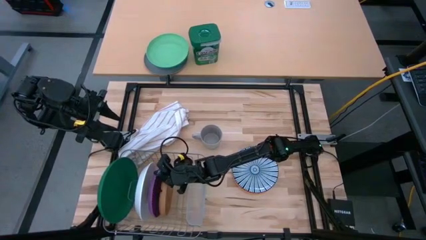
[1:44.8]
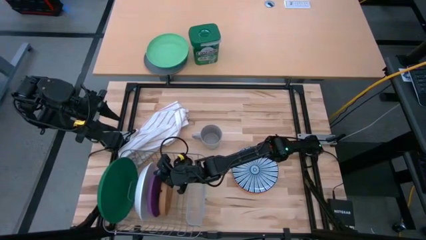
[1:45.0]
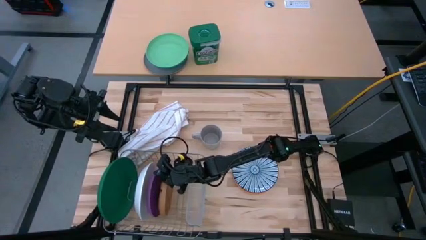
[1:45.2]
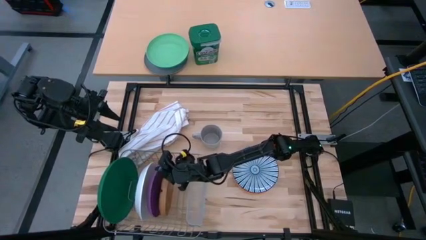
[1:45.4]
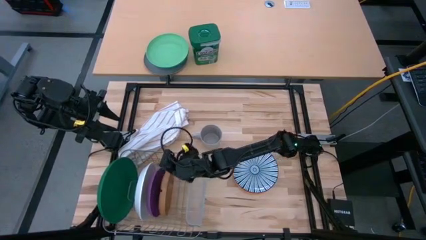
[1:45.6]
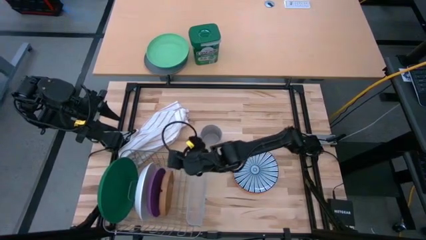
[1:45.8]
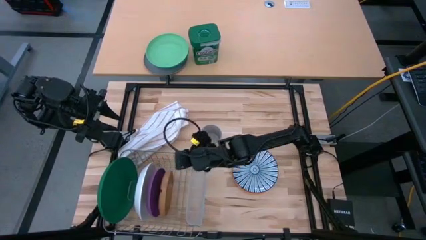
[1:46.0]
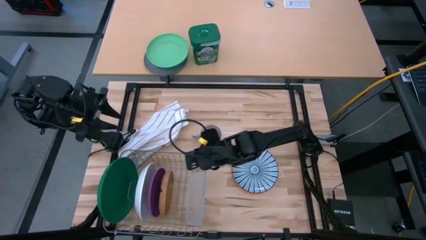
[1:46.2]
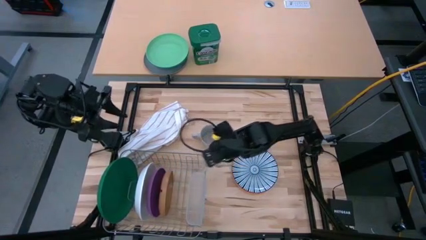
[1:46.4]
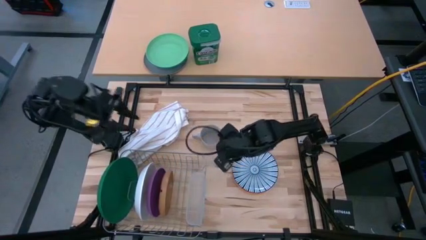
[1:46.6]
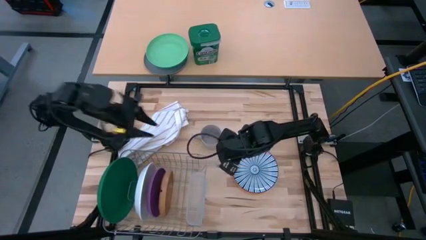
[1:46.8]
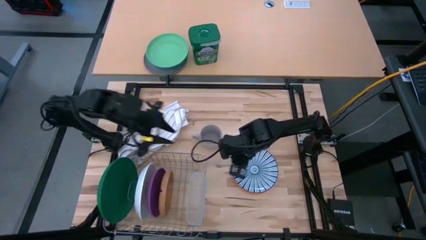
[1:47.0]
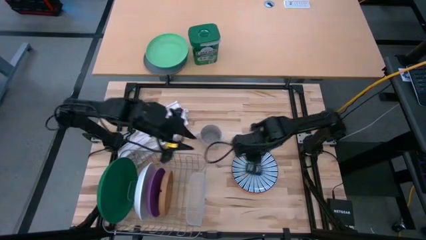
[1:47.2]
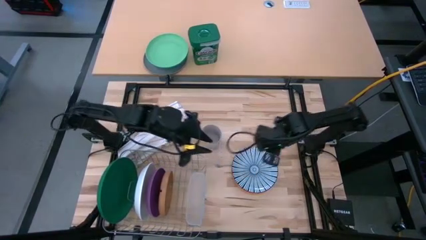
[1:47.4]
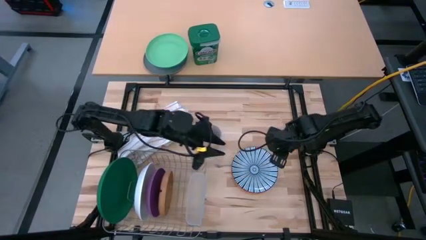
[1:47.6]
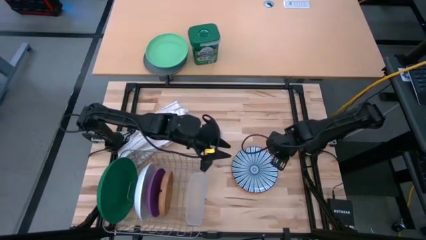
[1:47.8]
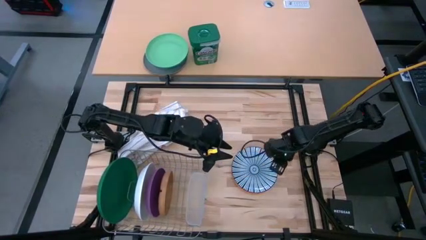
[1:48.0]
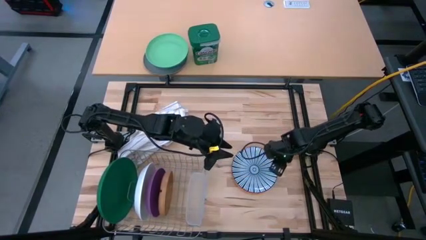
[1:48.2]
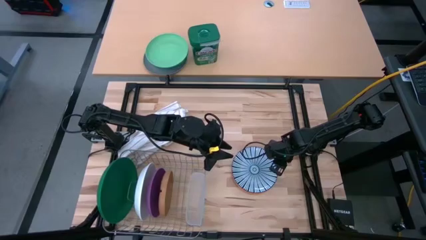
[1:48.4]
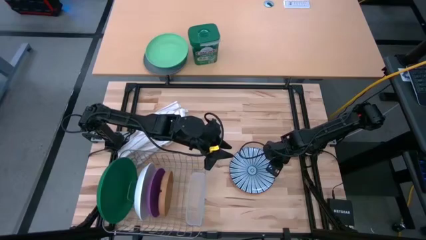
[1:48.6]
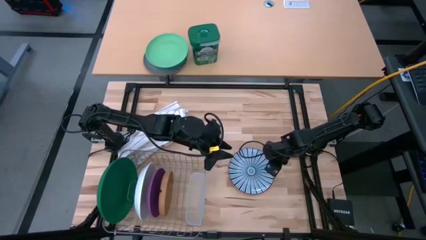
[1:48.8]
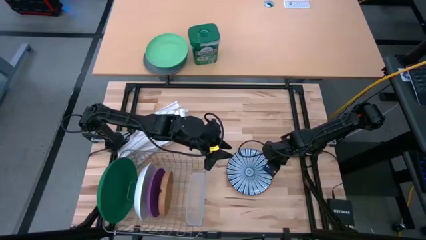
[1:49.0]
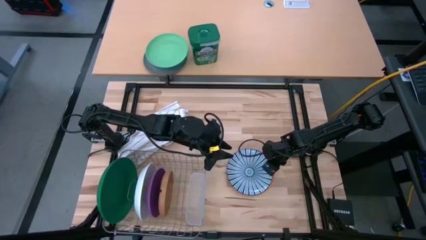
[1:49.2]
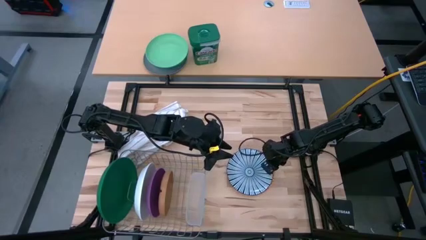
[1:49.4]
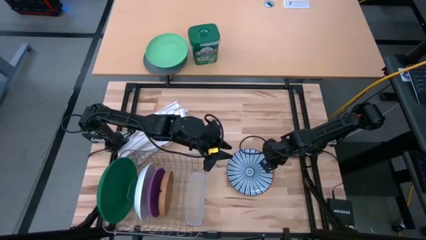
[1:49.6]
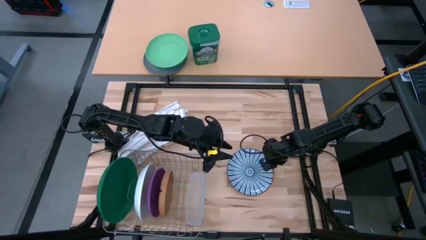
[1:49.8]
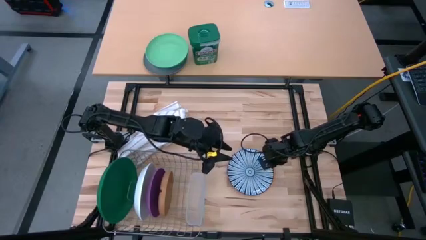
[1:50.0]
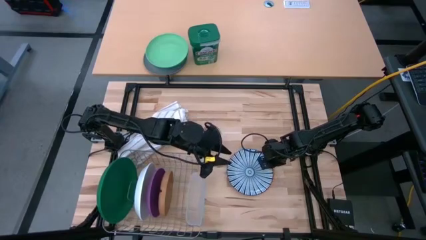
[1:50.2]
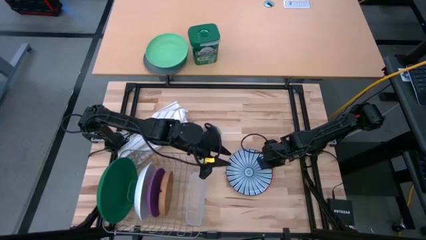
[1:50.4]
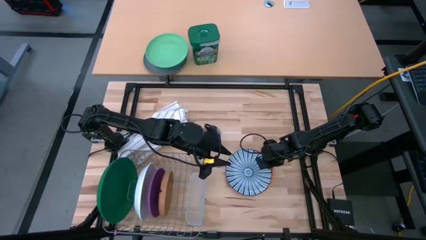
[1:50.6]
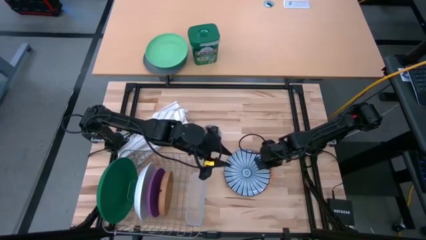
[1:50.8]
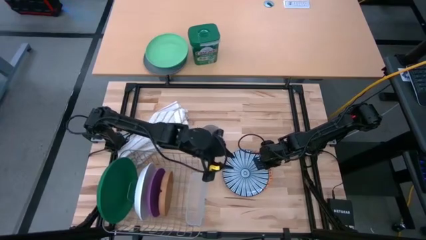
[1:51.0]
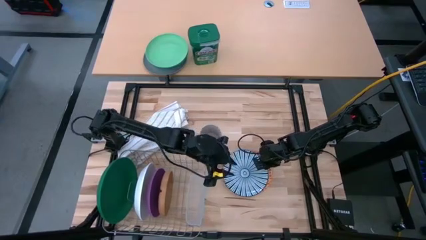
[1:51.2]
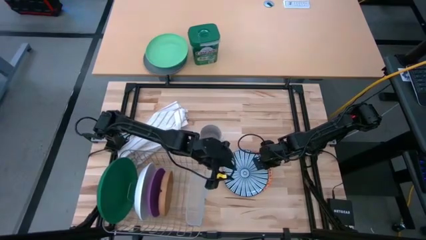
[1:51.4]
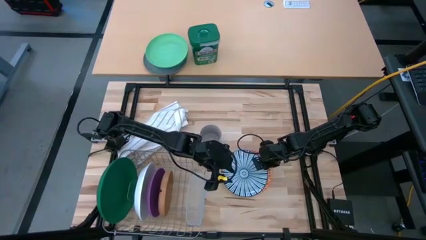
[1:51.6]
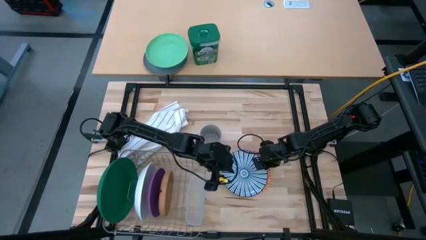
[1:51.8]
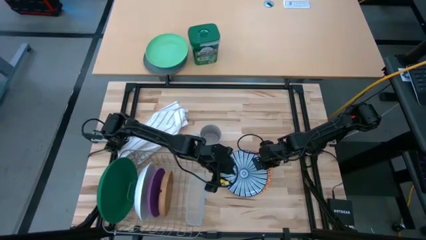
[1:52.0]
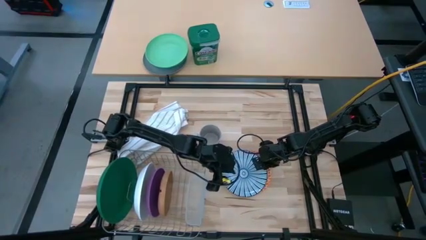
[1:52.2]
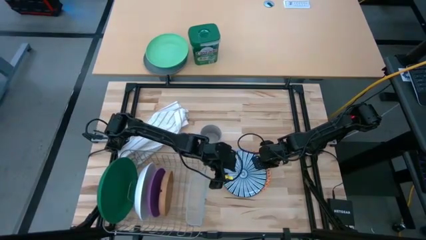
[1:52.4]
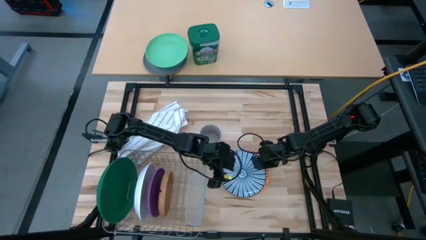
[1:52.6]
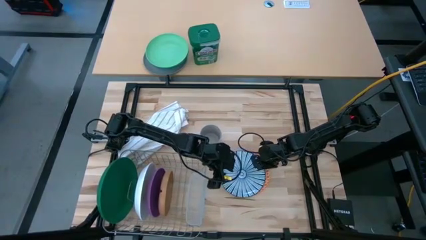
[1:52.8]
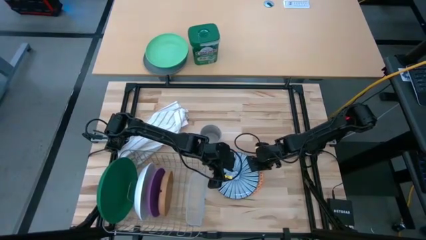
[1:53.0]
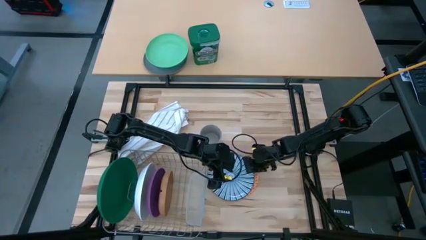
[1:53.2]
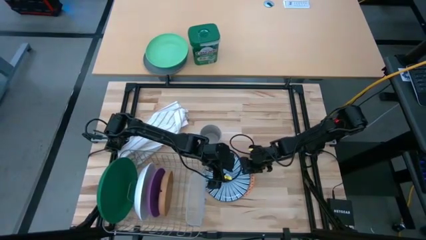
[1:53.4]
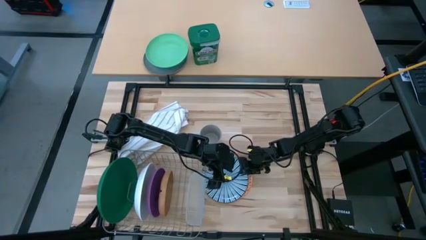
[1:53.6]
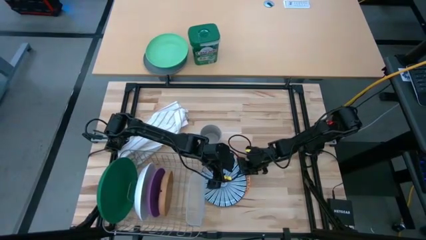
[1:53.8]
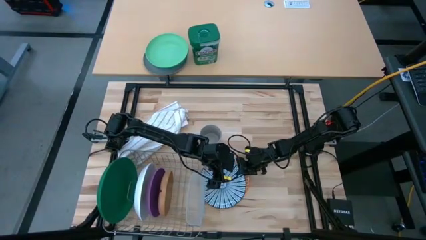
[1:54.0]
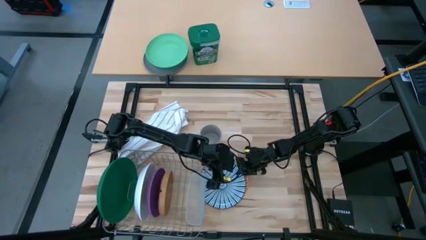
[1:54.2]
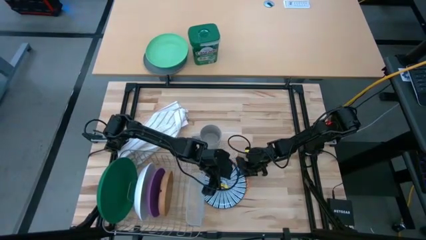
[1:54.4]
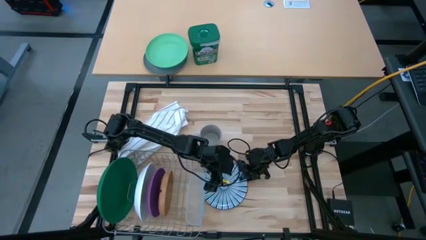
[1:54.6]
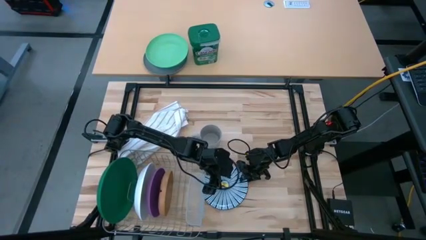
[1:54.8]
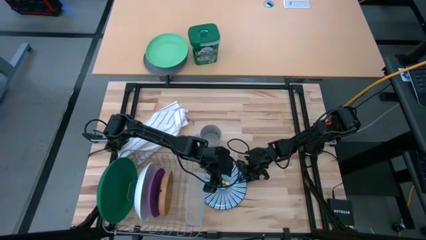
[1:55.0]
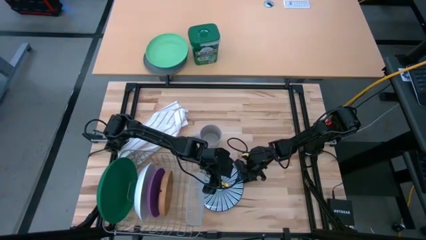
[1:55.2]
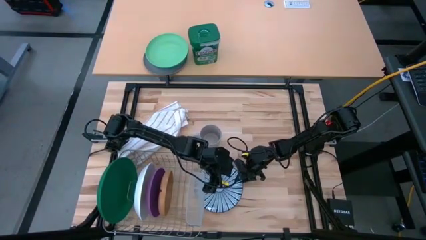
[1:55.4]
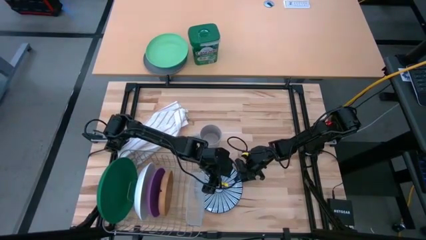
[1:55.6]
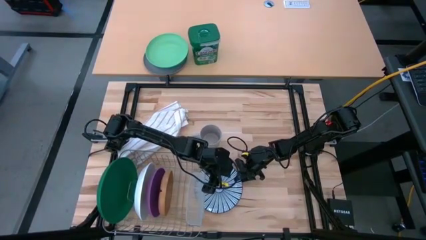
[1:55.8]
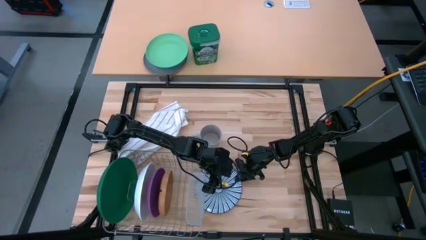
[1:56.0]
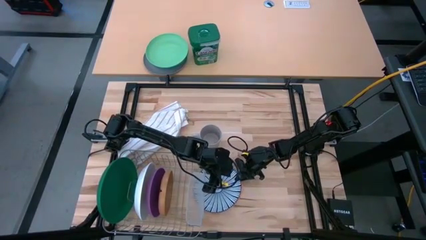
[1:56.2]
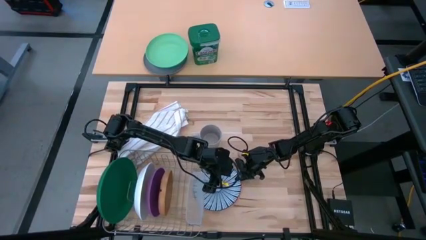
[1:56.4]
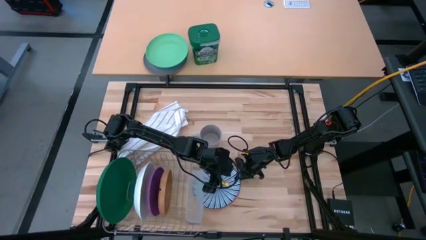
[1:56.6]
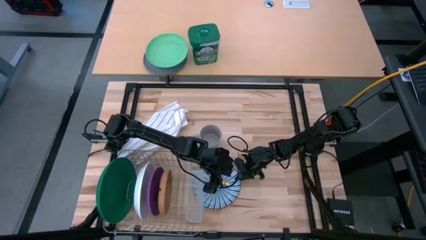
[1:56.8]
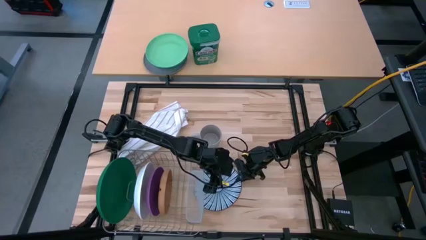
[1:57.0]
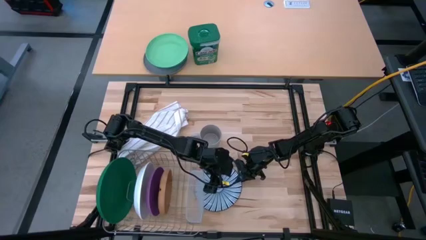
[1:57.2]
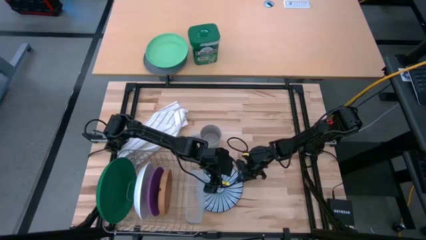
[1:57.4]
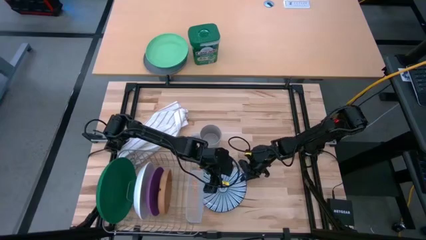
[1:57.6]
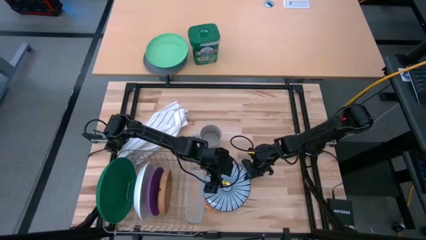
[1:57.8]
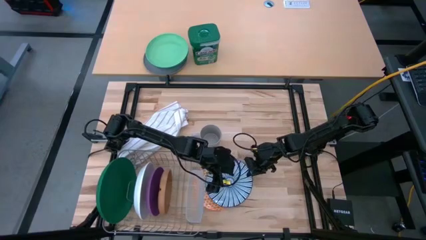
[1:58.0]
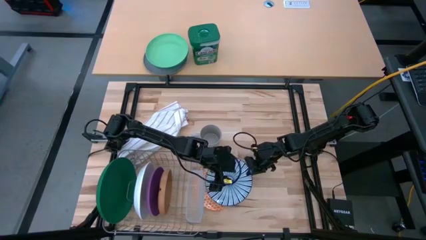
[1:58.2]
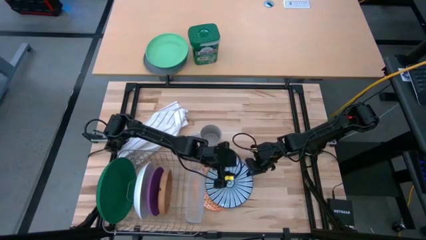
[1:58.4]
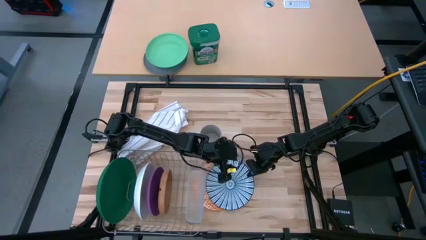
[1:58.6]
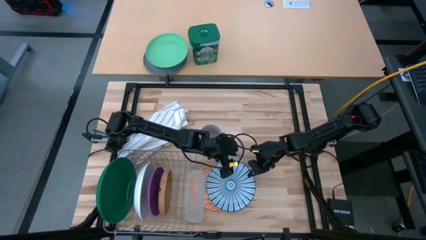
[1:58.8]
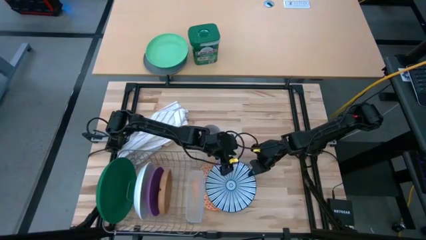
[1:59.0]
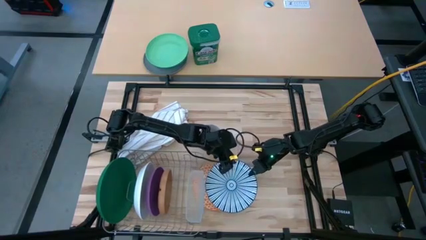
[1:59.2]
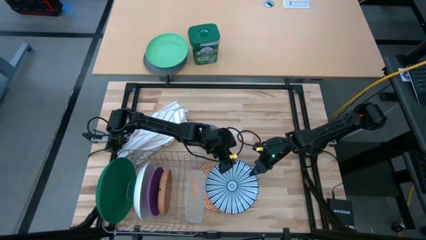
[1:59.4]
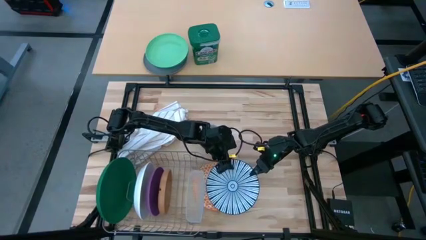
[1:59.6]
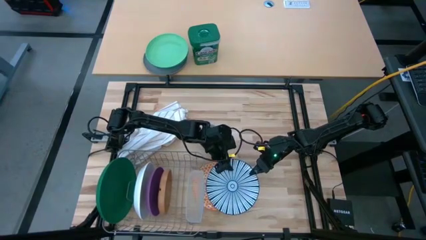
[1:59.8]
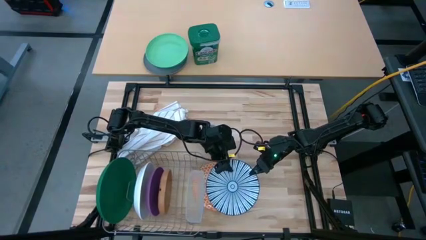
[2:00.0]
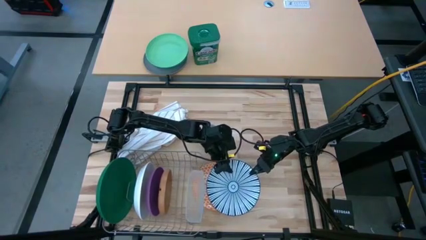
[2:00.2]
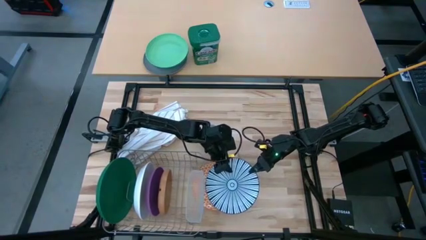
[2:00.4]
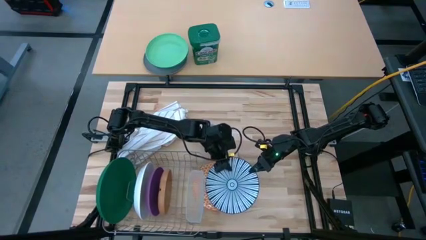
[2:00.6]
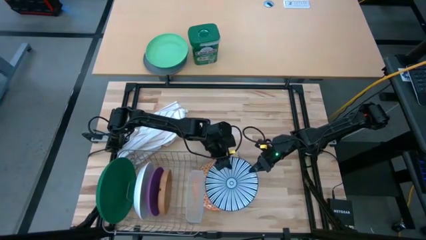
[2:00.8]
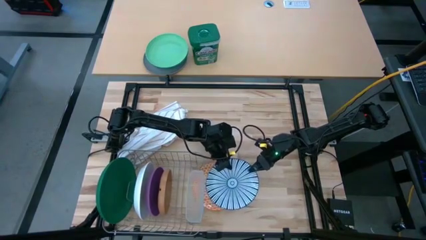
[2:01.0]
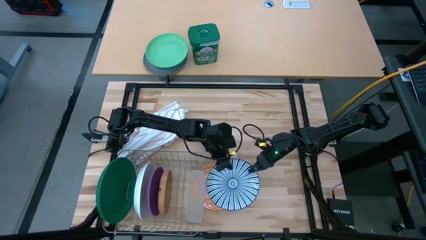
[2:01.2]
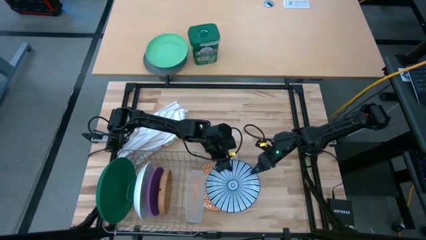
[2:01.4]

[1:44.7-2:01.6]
Task: Sort dishes
Put the blue patterned plate into the dish rack
